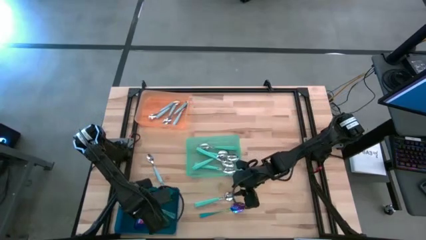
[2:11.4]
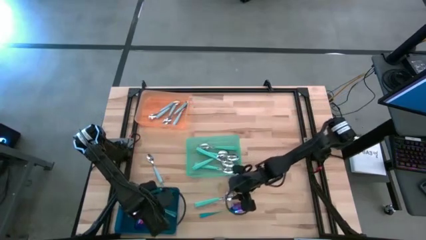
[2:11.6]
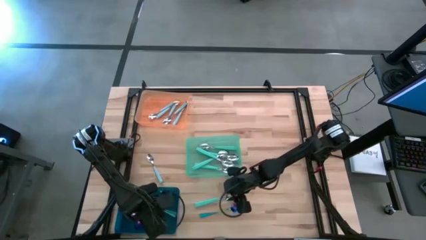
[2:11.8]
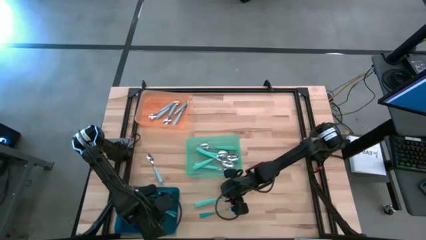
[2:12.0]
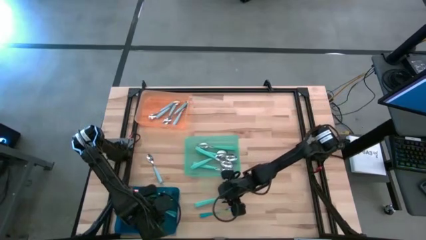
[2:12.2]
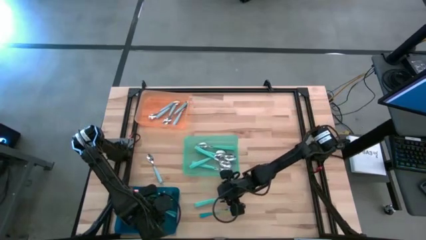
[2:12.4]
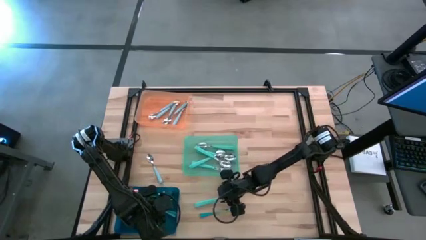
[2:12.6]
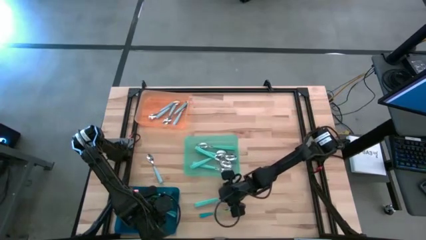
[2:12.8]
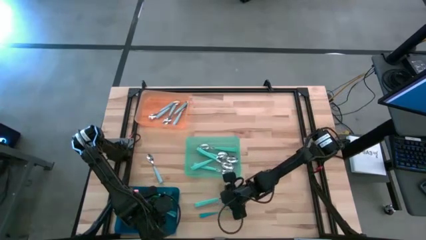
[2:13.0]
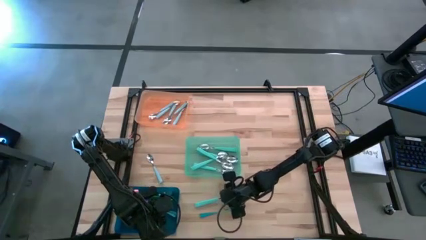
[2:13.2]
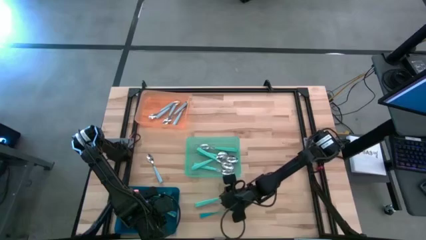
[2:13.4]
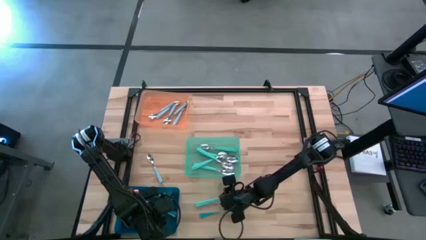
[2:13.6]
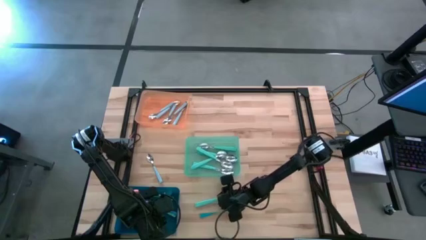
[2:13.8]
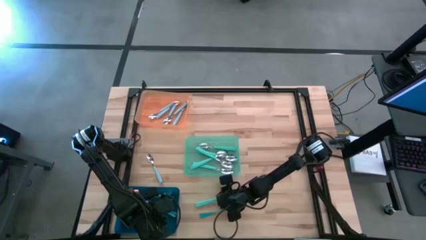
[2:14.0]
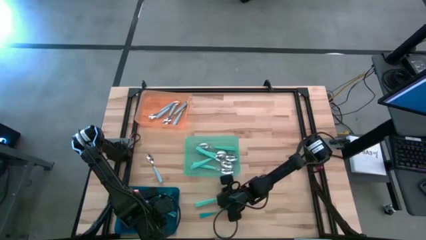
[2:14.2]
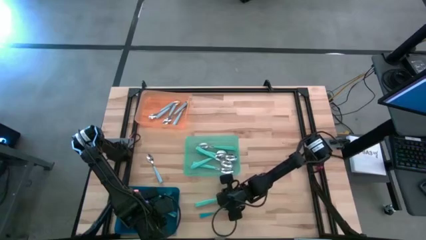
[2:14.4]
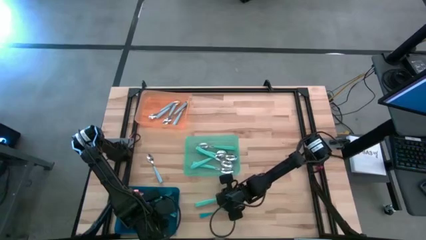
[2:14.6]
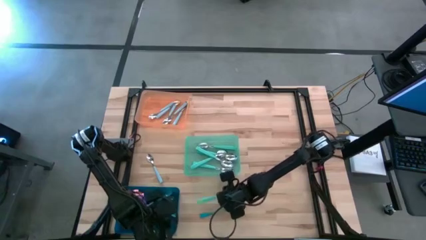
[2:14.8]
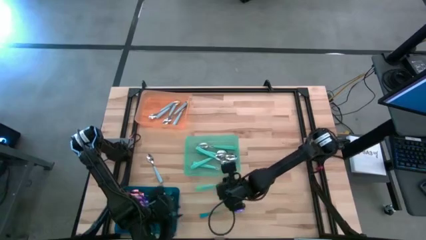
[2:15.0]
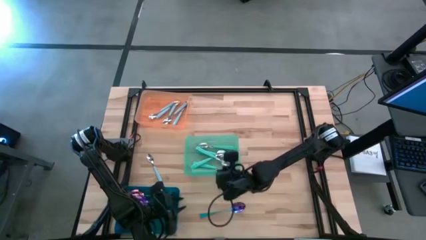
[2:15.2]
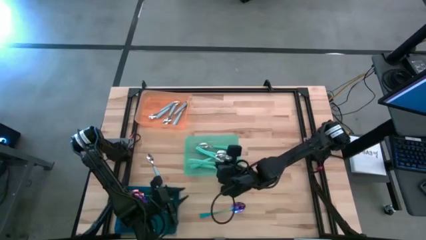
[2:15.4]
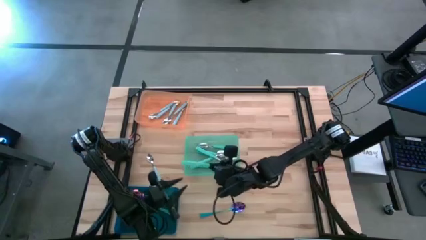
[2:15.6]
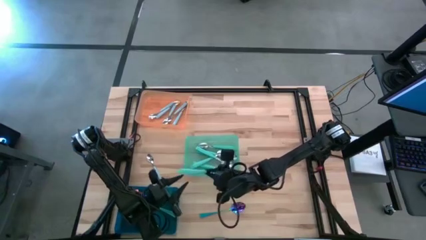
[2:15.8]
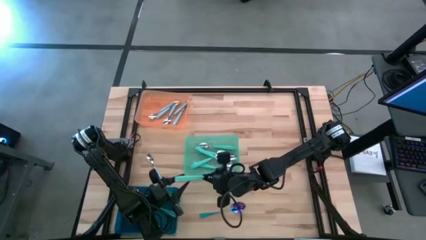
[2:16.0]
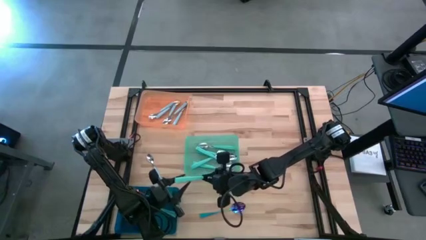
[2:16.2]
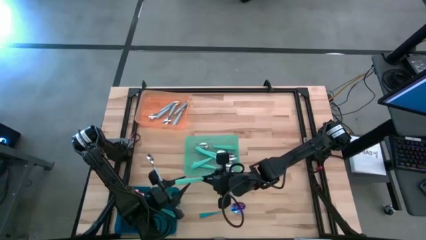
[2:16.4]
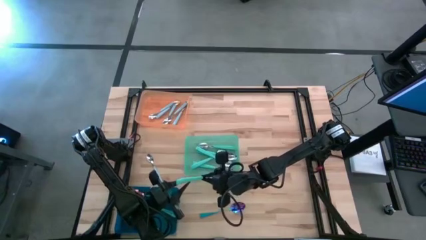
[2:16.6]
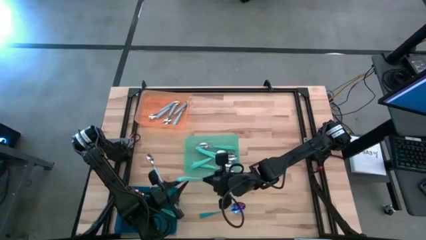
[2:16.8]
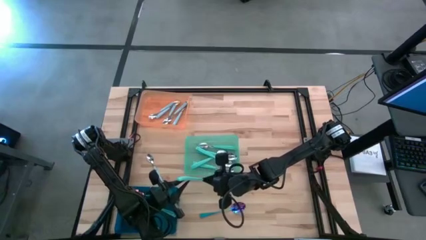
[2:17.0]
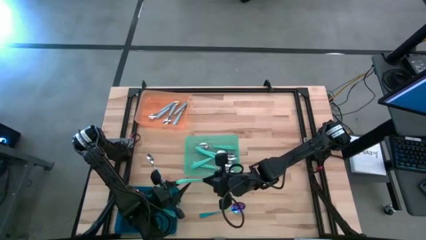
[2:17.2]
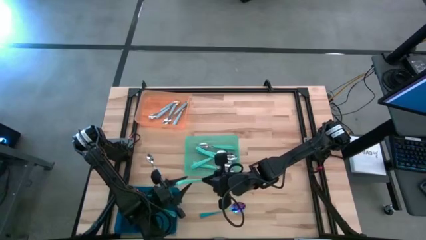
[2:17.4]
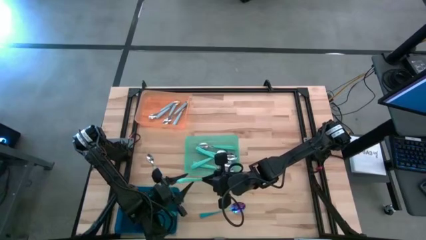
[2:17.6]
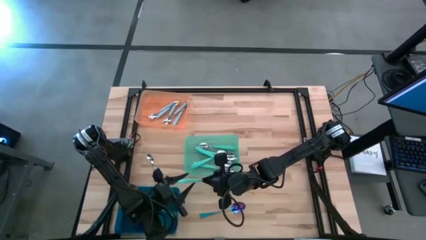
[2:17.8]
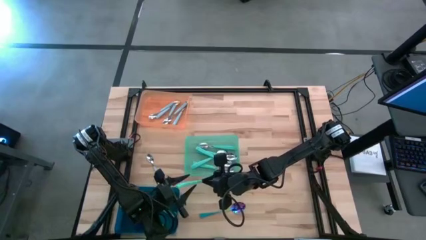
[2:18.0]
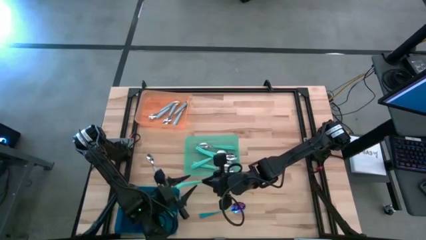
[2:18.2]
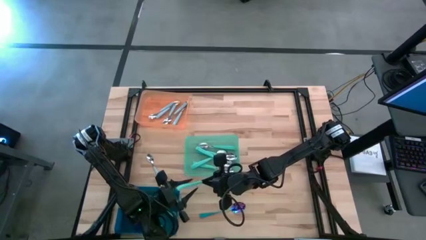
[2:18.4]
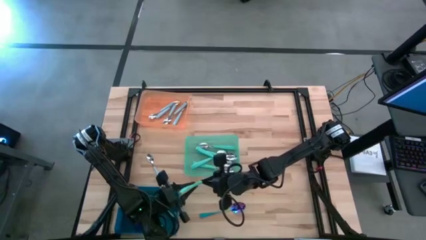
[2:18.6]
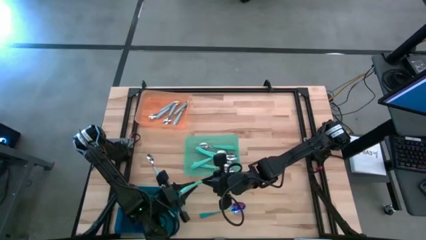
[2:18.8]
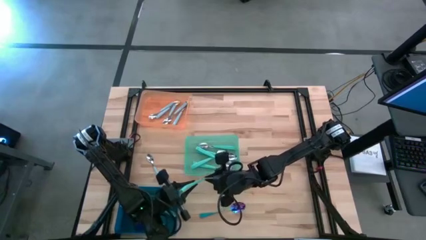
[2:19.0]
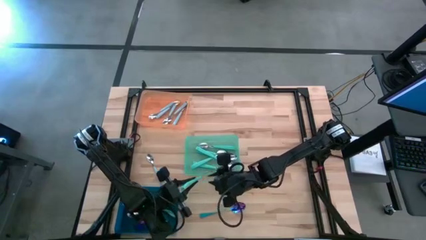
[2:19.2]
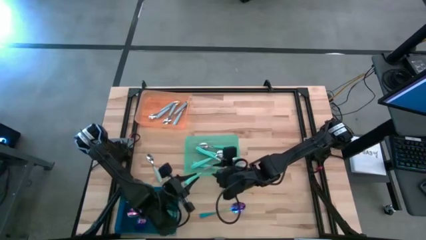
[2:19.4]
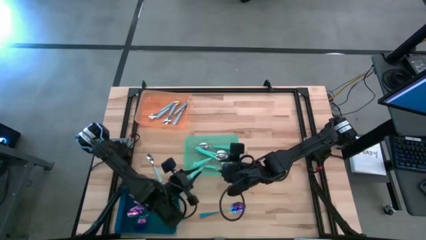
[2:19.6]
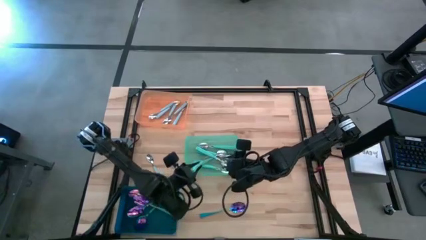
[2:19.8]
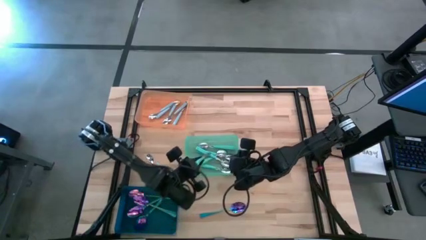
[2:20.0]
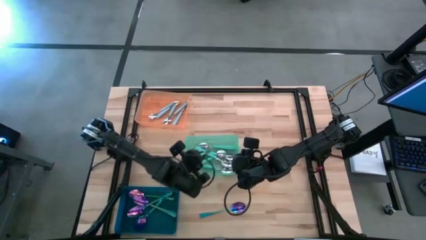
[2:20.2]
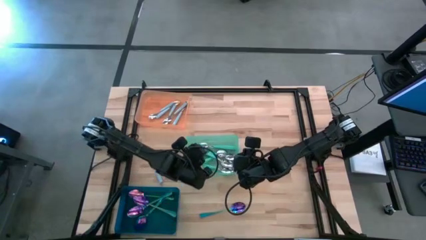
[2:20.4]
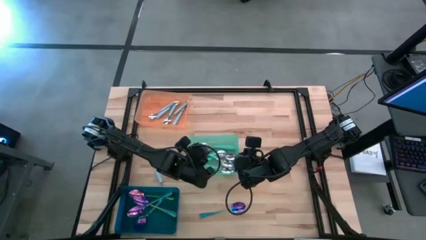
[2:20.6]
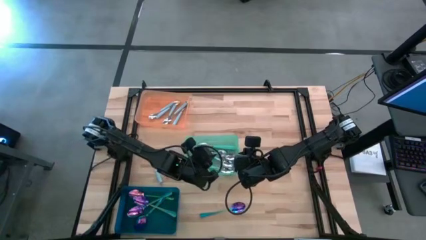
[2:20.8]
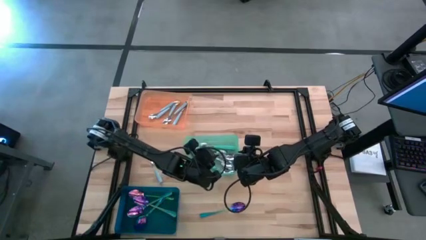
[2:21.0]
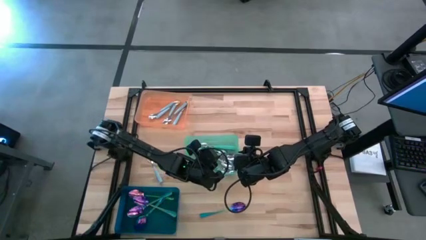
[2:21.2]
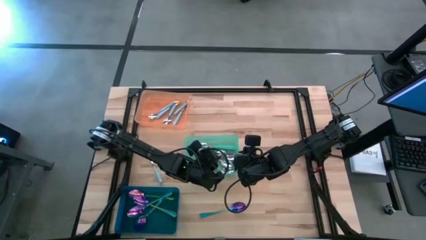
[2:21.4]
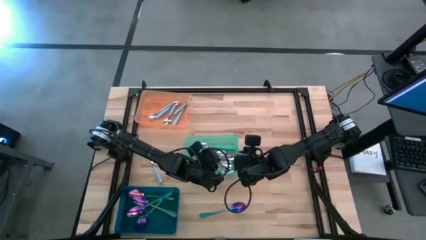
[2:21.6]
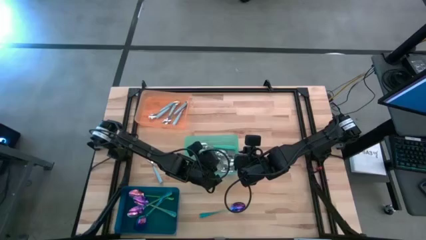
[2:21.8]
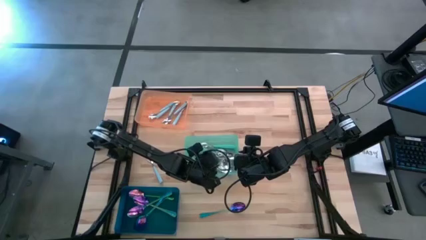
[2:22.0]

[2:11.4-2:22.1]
Task: Sort silverware by color (type)
Put the green spoon into the green bin

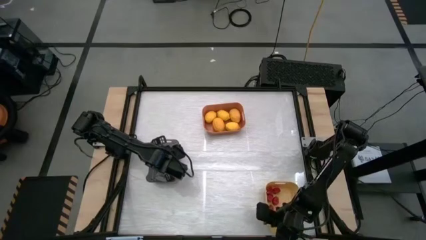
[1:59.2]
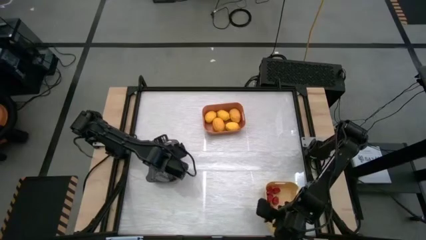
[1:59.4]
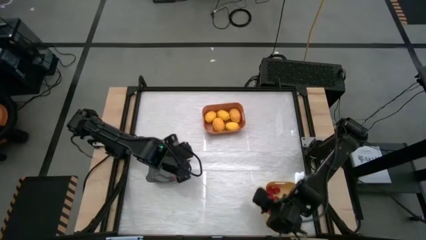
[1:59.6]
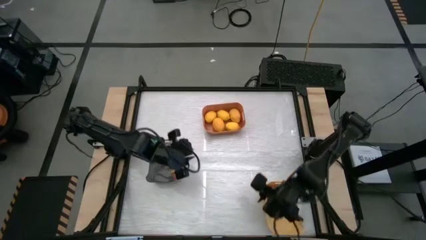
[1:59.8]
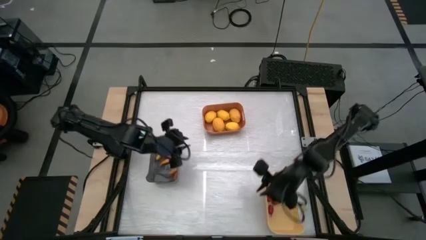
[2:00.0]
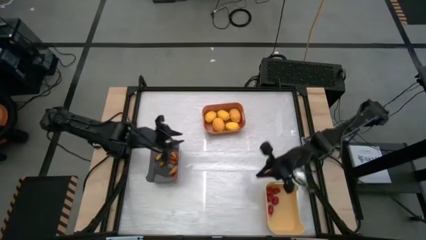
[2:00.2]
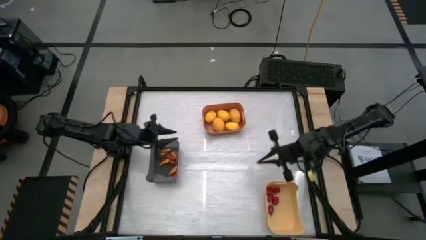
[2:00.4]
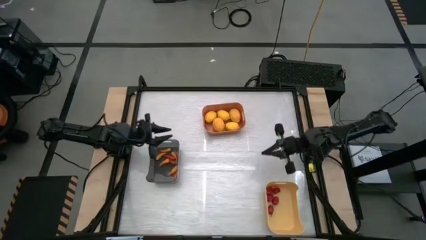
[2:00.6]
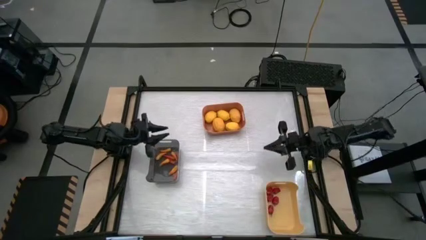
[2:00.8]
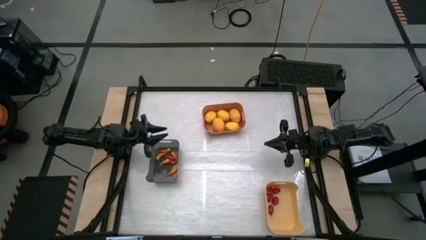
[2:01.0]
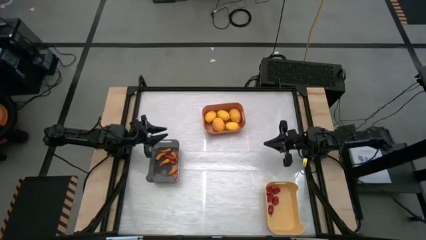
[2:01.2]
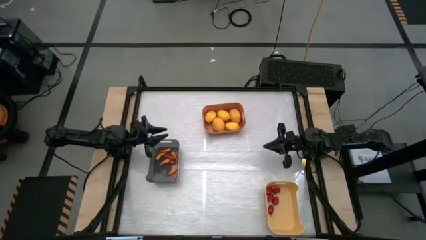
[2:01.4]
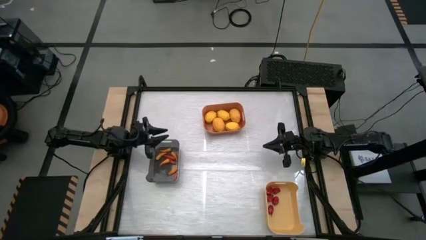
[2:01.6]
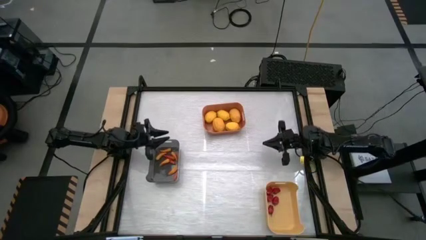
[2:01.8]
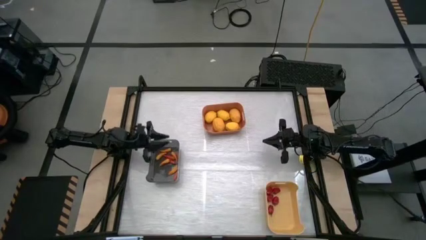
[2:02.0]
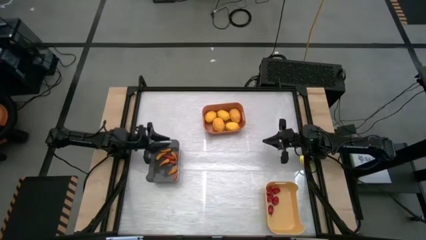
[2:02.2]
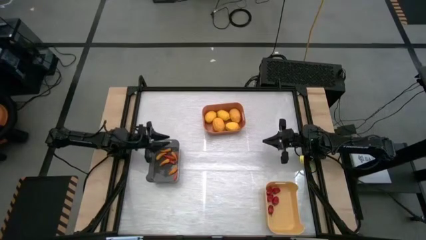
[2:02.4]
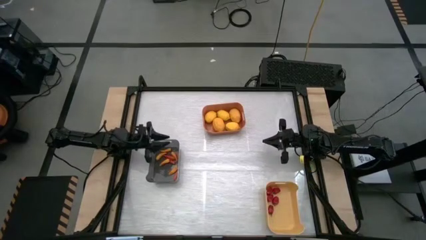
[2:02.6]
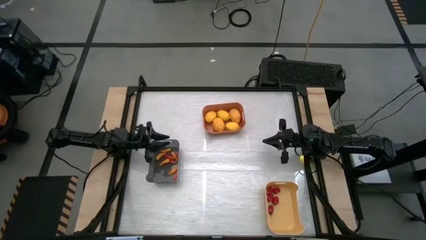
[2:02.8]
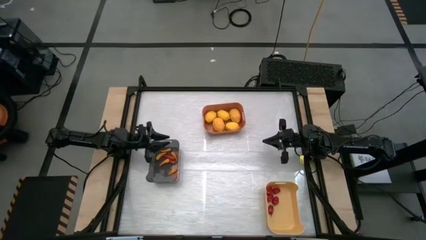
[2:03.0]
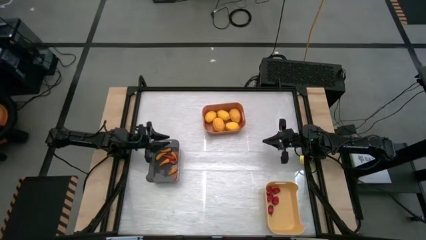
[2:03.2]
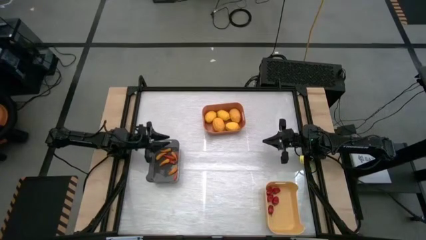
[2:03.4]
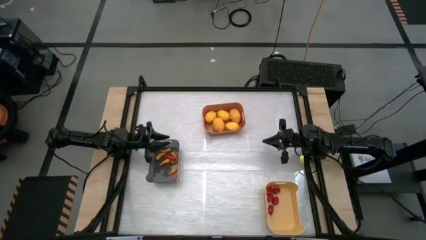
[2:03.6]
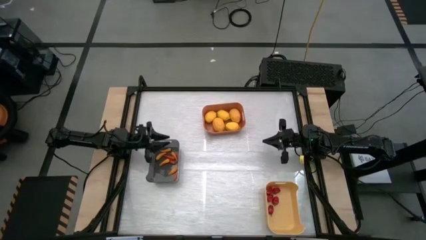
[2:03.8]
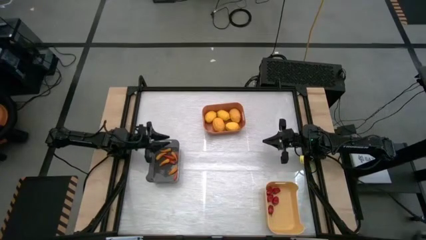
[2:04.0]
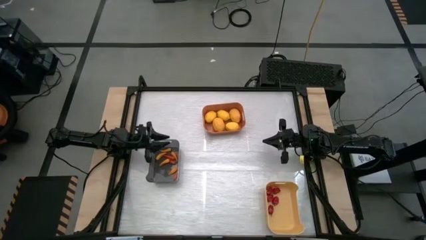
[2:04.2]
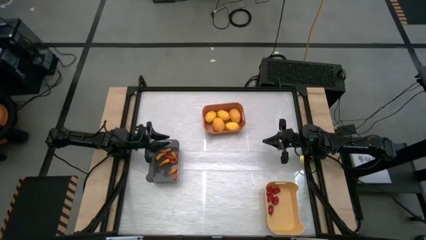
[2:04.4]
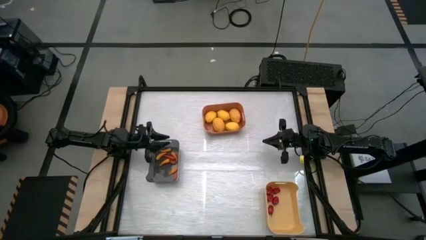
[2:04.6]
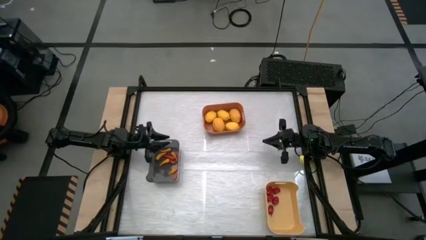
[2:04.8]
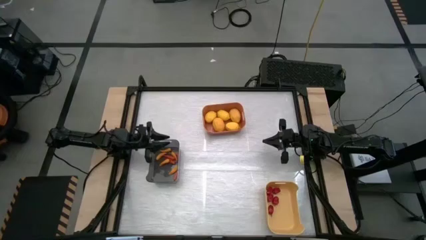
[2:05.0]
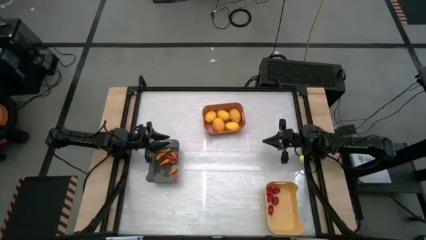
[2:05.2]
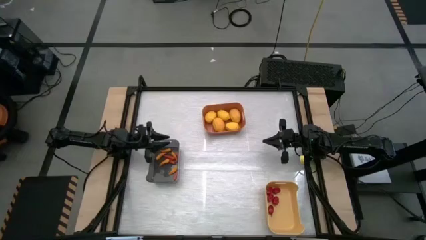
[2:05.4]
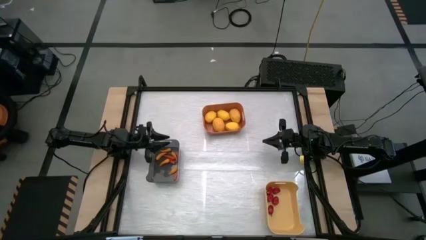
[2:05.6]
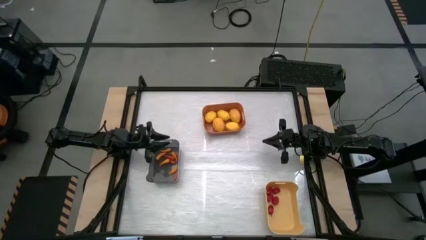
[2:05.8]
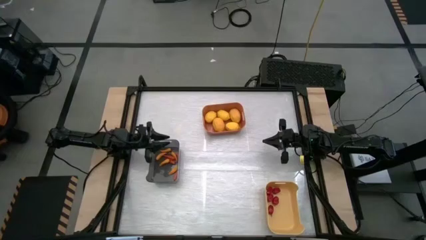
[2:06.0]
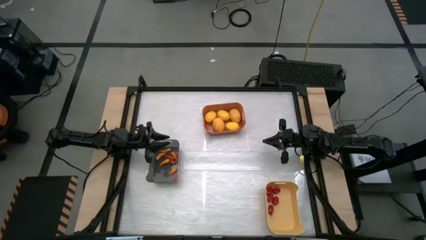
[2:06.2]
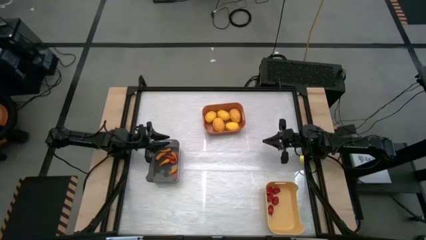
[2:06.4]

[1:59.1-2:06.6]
Task: Sort produce into baskets
Return to Home Position
